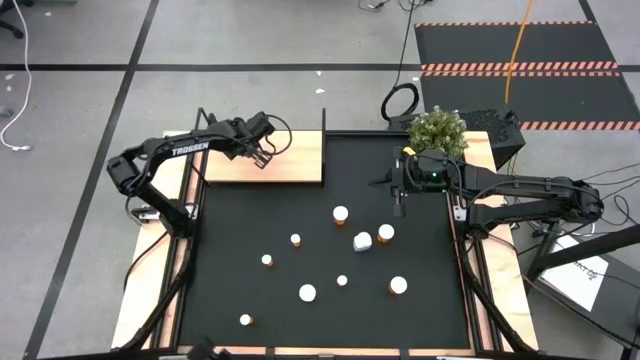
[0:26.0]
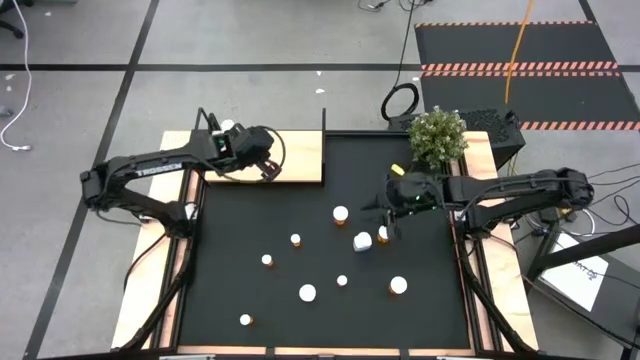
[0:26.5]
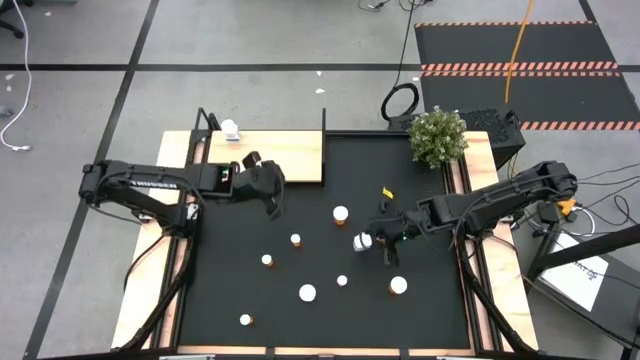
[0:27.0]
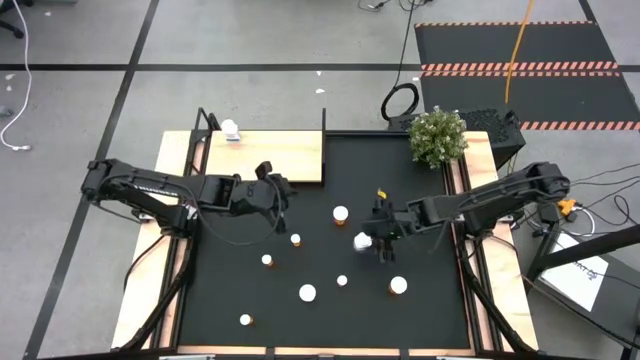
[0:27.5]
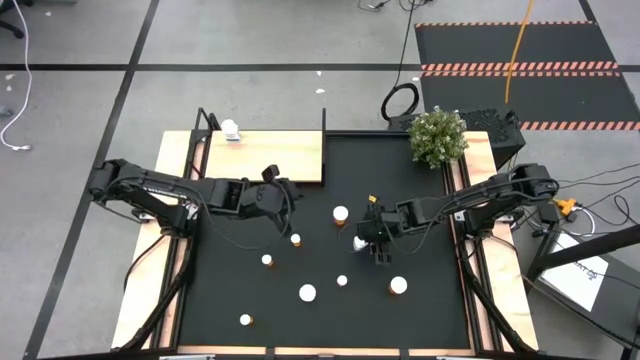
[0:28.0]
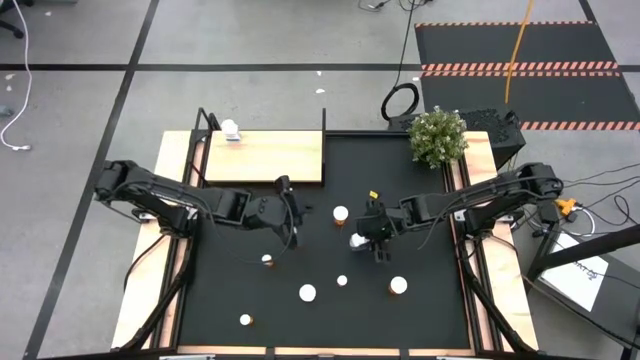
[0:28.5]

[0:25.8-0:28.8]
Task: Pick and place medicine bottles onto shelf by color
Put the white pill bottle on the shelf aligned with the other white pill bottle on the shelf

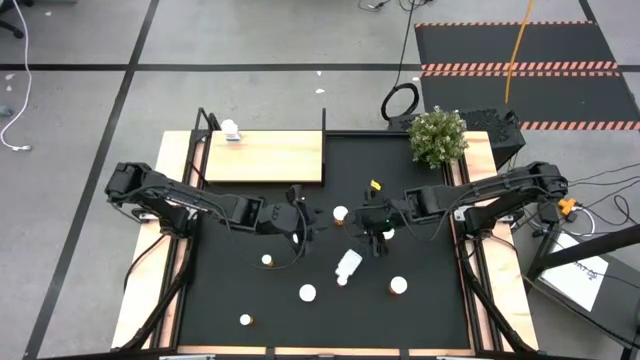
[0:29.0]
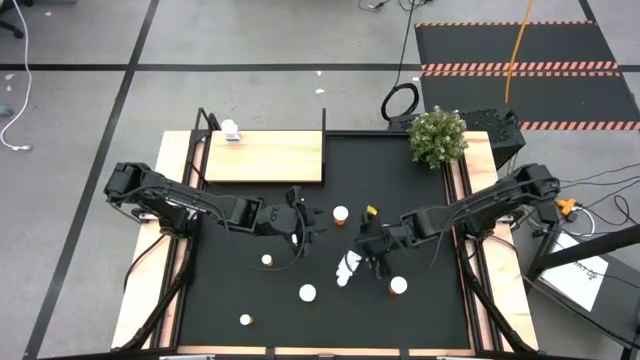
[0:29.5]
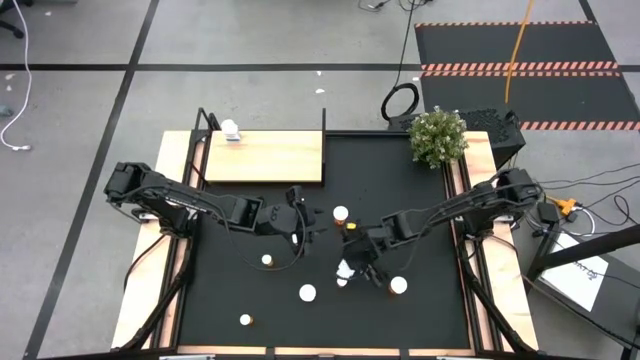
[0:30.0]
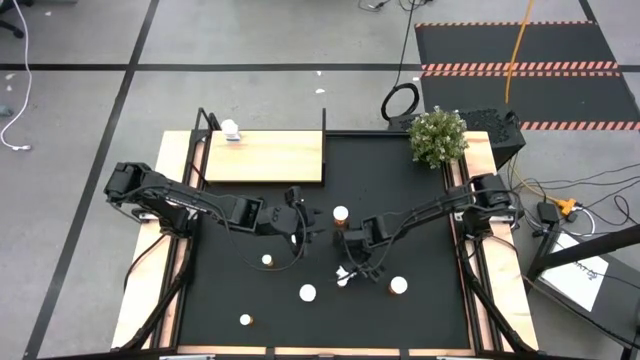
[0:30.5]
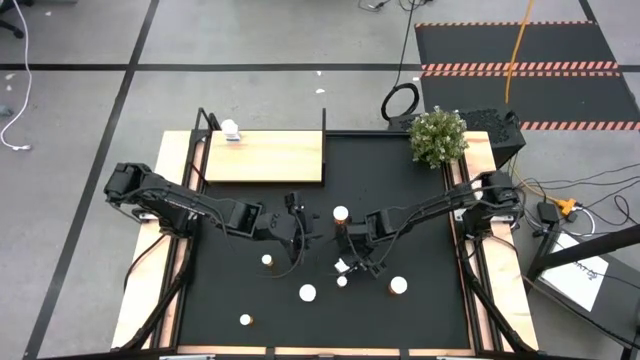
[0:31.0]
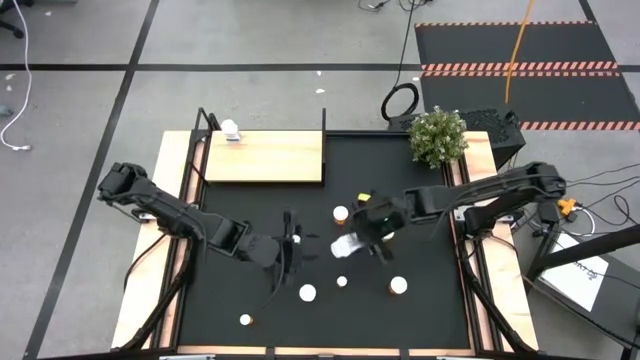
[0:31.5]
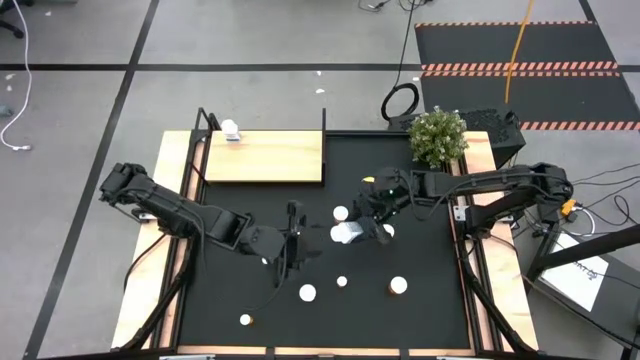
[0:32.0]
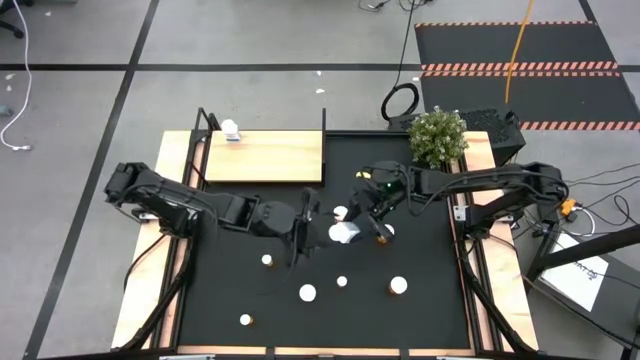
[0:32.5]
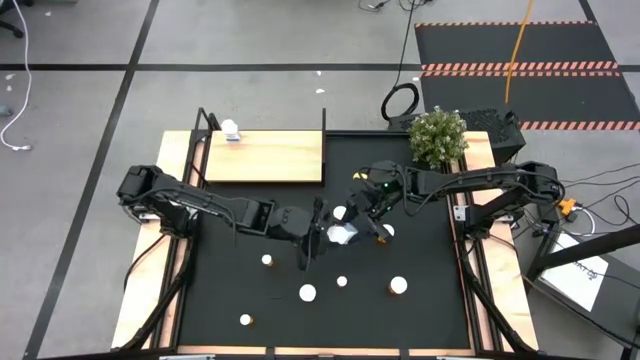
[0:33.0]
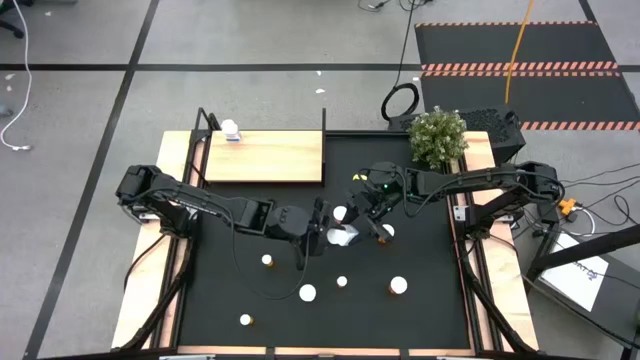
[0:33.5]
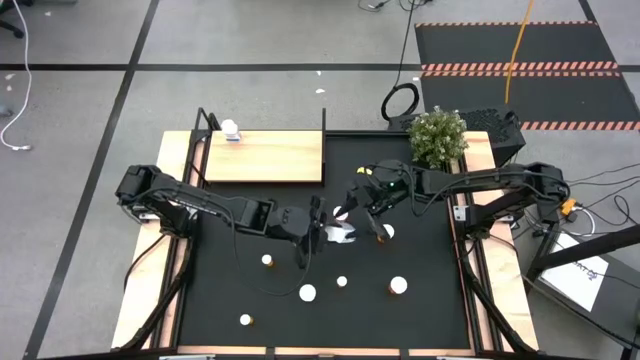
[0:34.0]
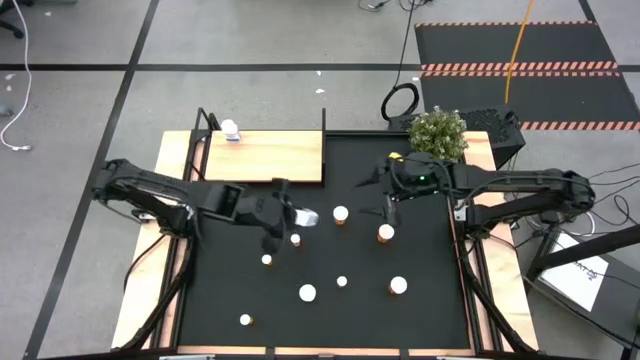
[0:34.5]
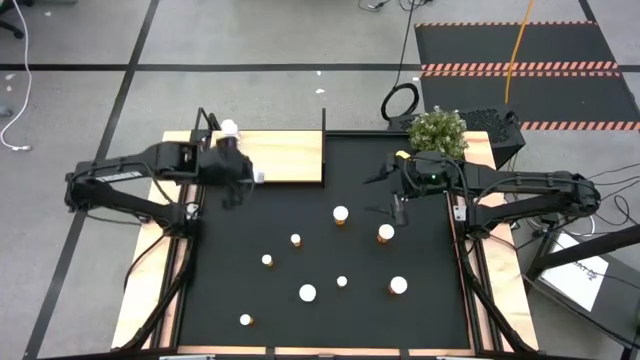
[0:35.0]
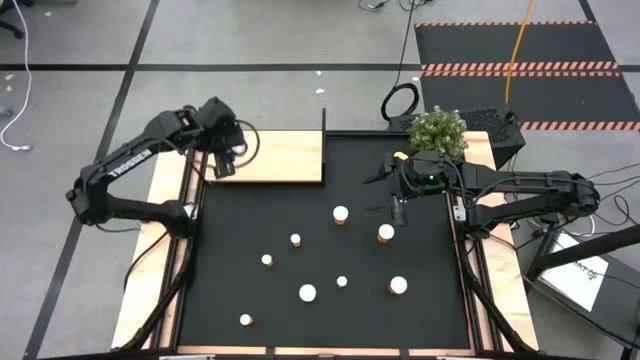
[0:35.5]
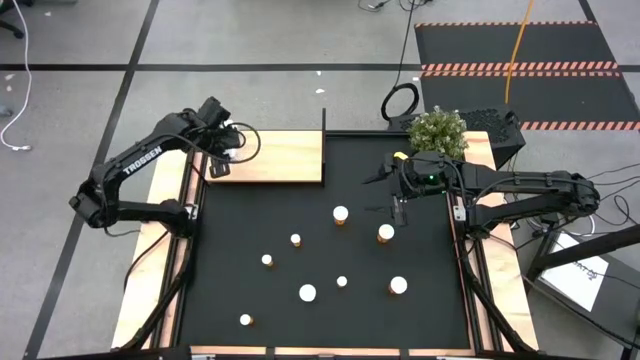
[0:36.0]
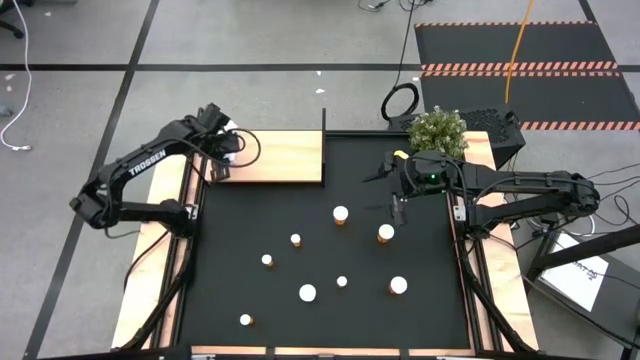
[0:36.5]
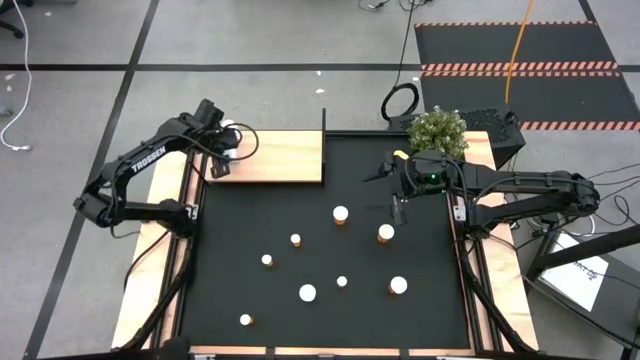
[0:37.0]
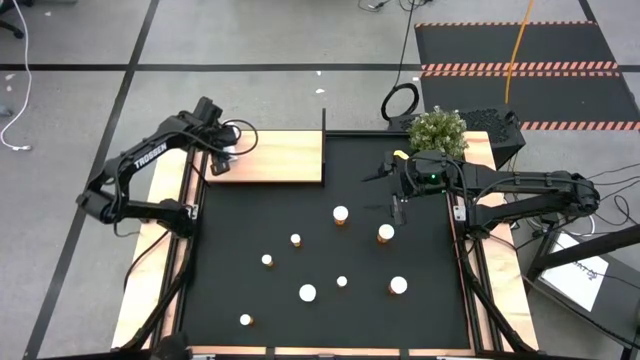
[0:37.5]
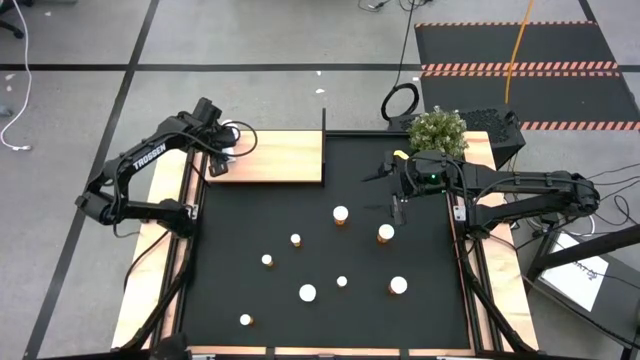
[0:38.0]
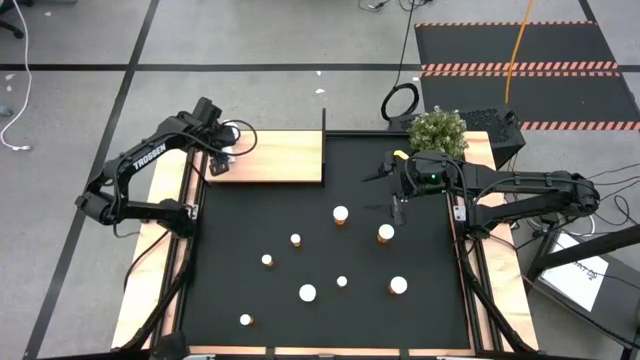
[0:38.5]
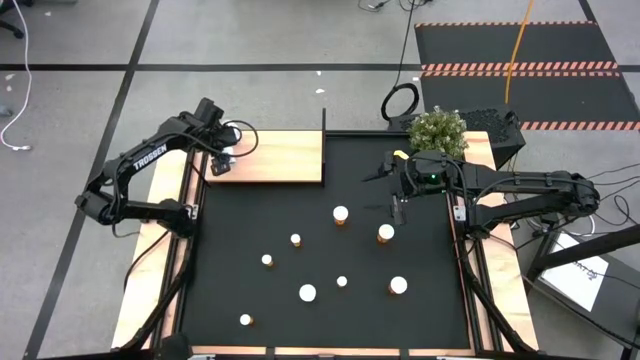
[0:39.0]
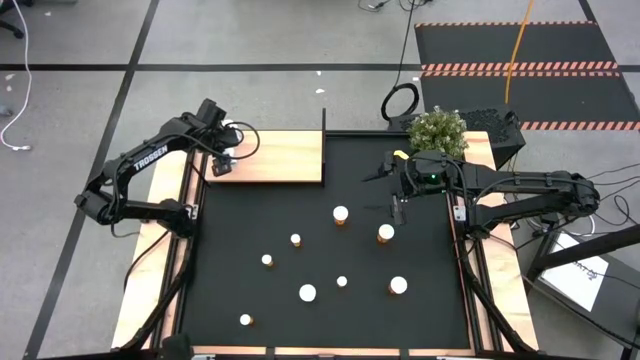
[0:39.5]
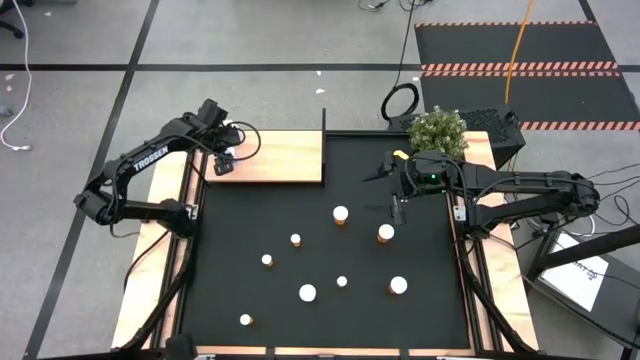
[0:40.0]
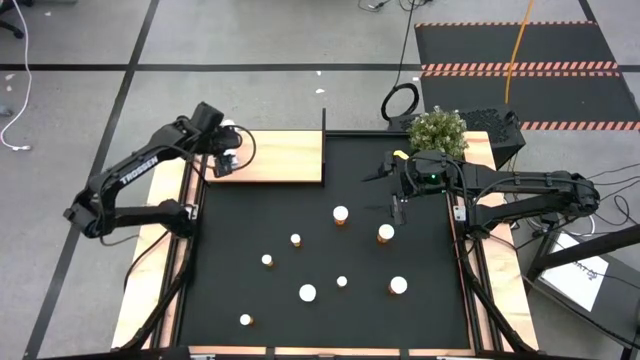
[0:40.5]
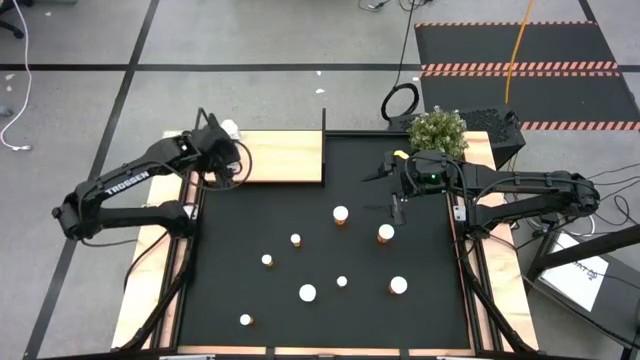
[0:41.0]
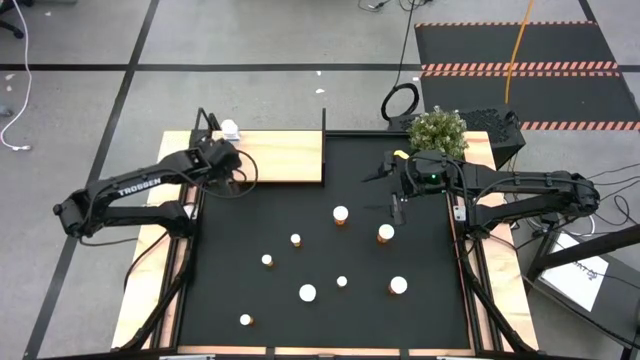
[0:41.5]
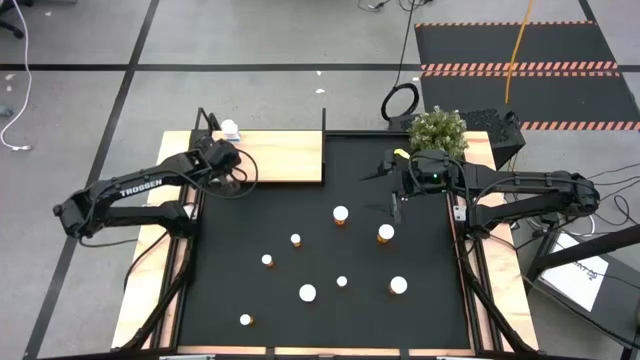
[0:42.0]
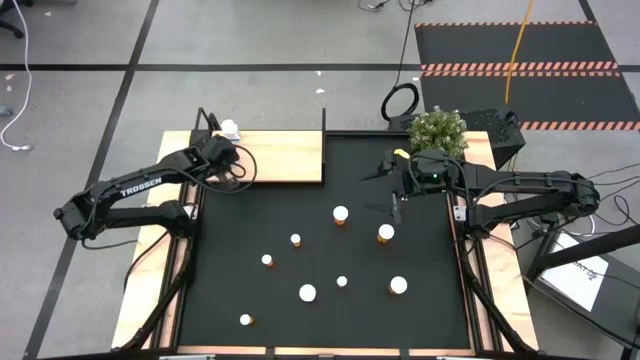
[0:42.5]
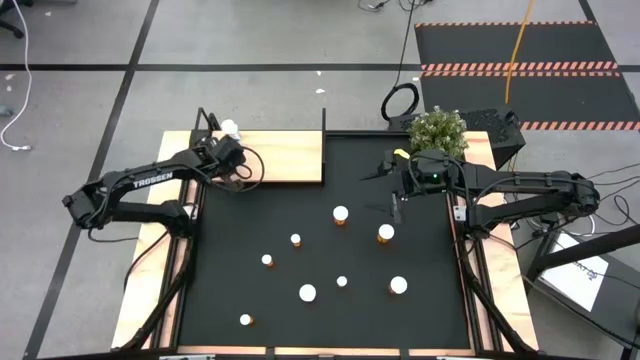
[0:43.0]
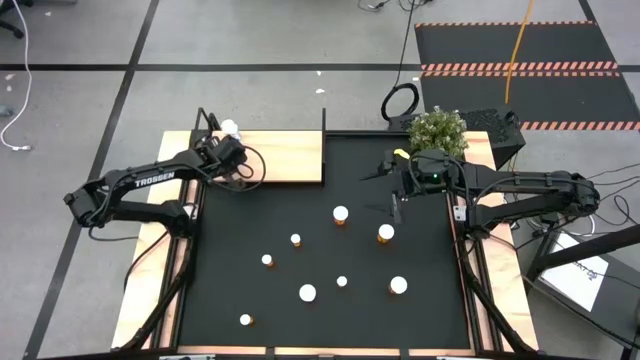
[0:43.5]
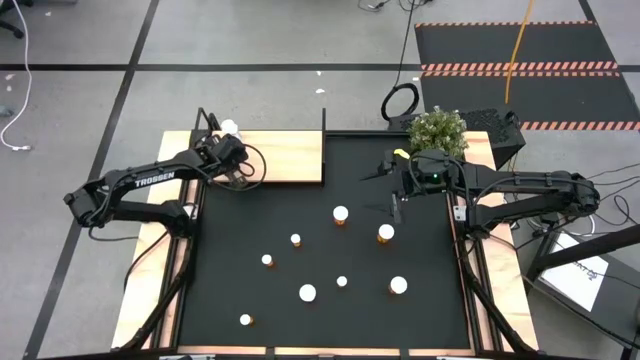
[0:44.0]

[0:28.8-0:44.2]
Put the white pill bottle on the shelf aligned with the other white pill bottle on the shelf

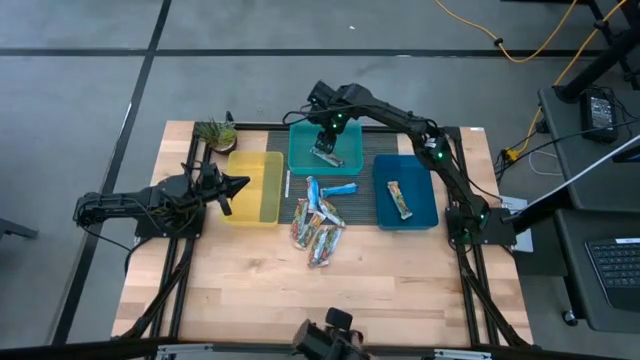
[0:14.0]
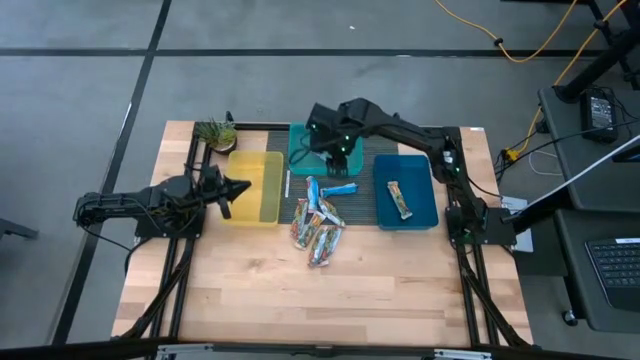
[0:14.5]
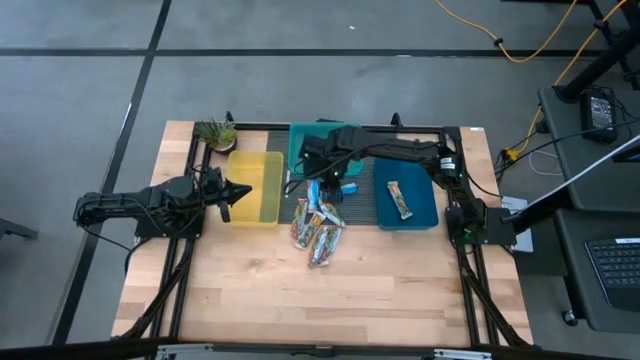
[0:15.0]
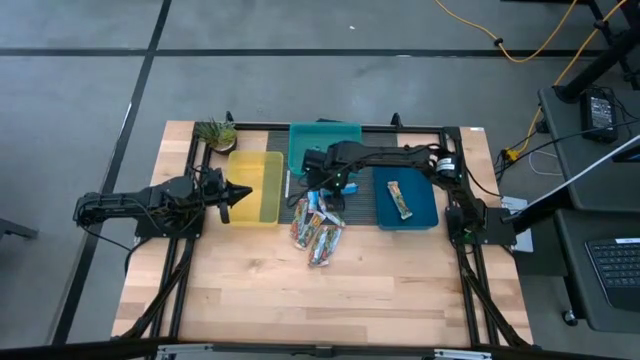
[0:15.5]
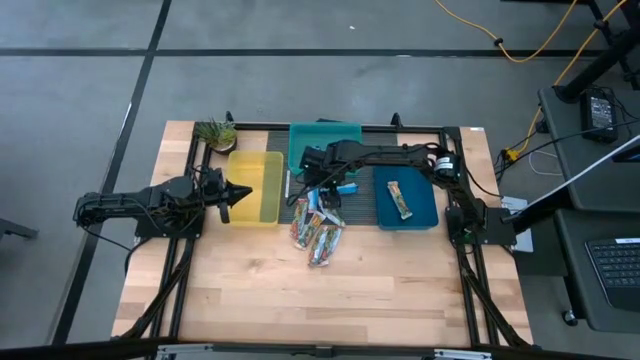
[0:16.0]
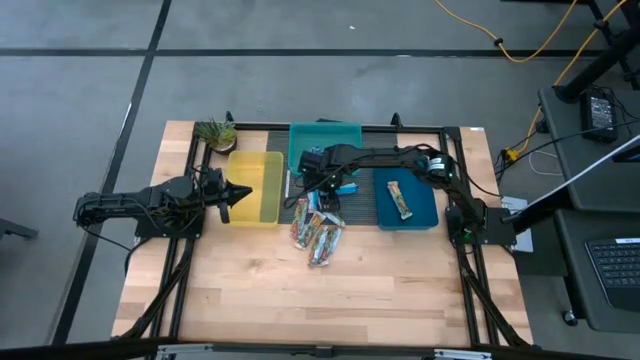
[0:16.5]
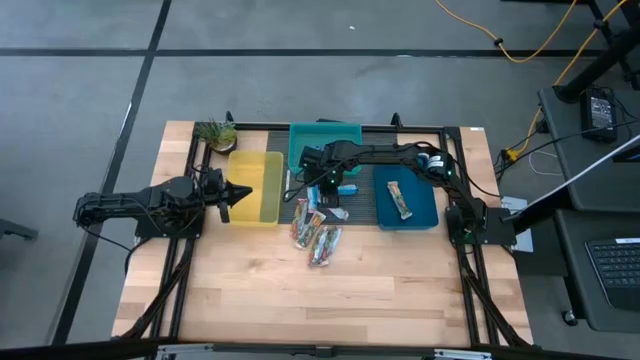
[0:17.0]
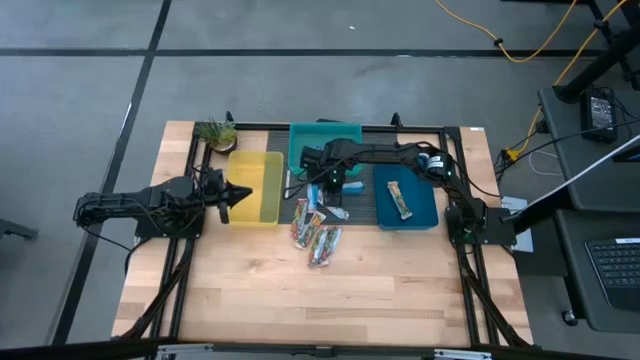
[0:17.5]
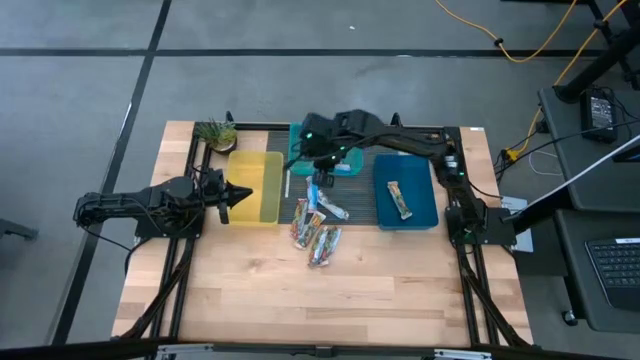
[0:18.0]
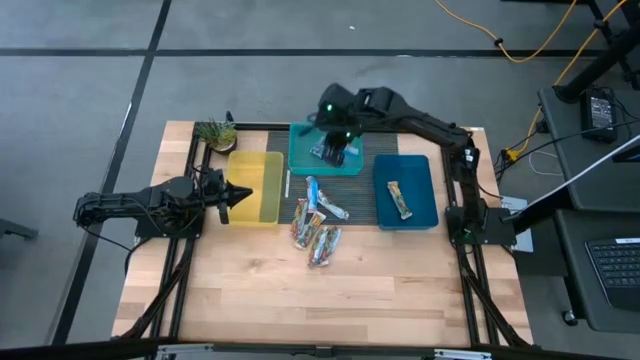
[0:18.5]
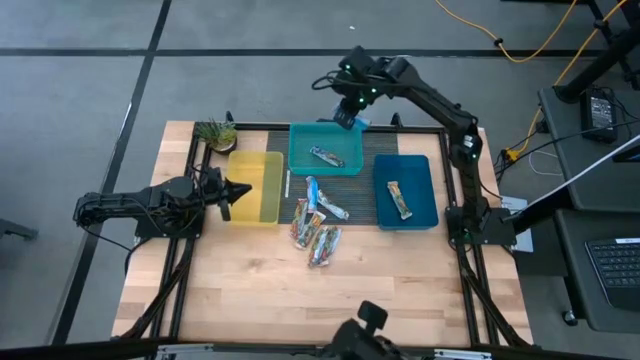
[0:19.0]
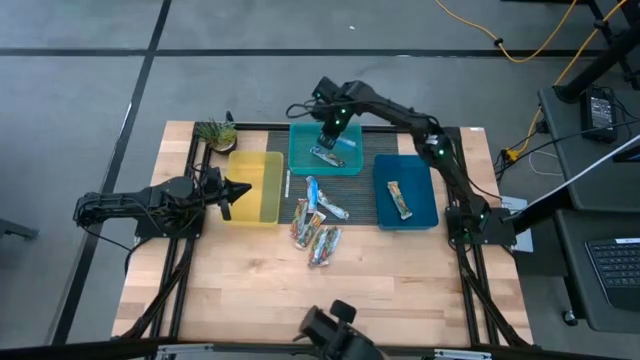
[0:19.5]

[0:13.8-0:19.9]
Task: Pick and place Granola Bars by type
Put the purple granola bar into the green bin
